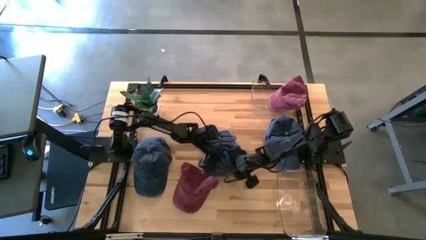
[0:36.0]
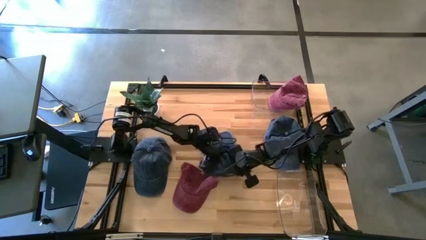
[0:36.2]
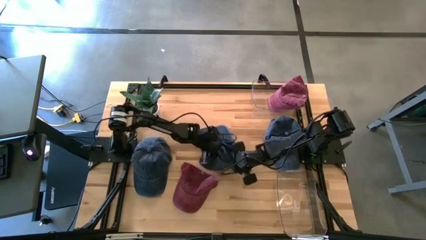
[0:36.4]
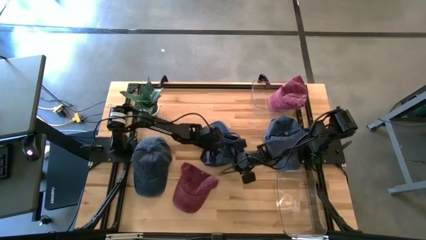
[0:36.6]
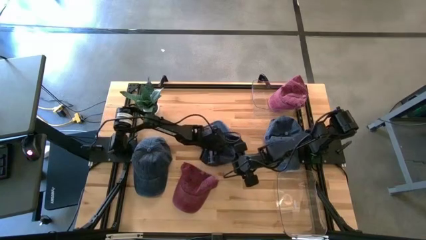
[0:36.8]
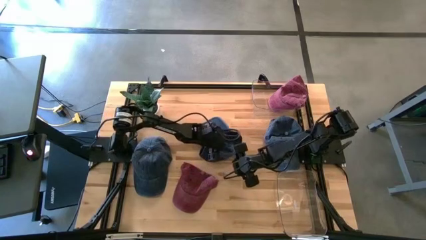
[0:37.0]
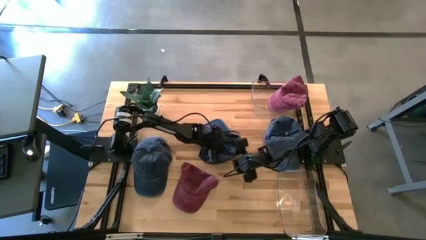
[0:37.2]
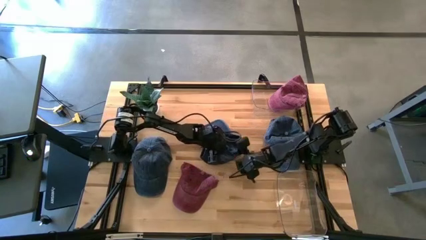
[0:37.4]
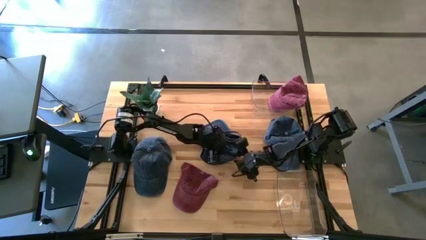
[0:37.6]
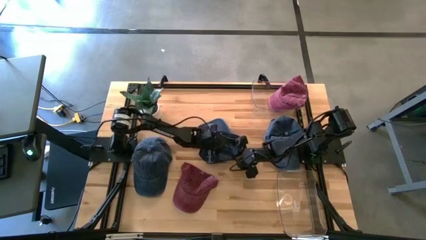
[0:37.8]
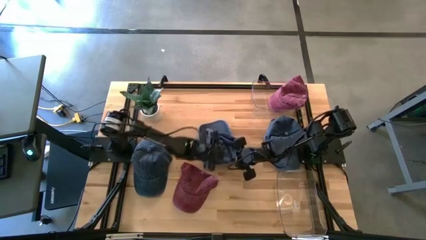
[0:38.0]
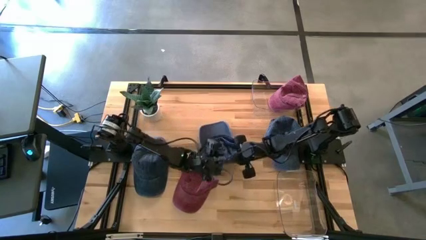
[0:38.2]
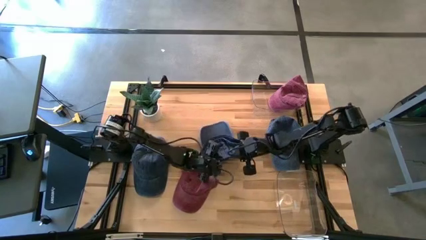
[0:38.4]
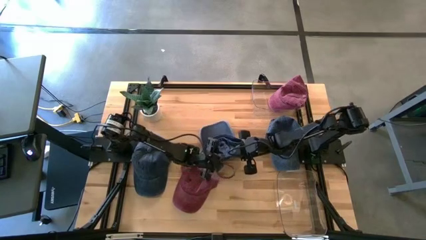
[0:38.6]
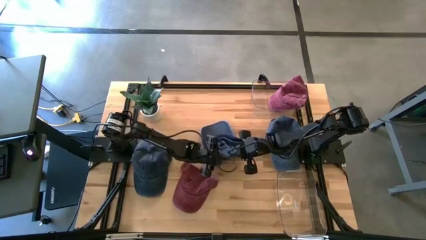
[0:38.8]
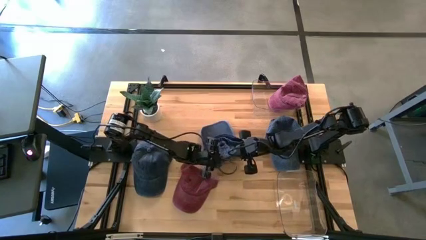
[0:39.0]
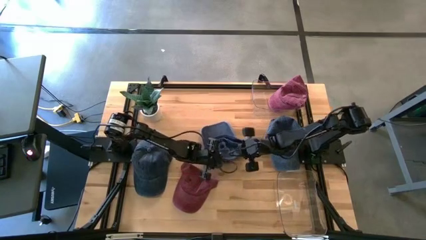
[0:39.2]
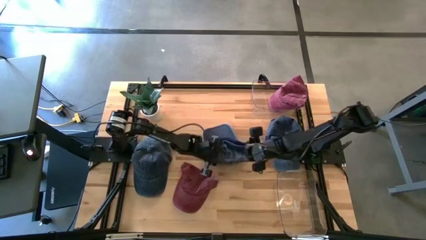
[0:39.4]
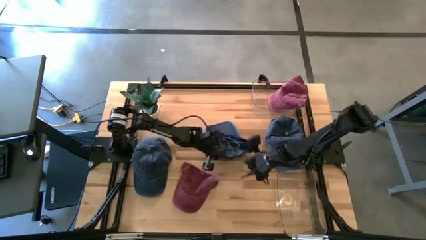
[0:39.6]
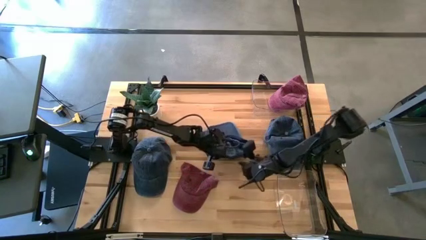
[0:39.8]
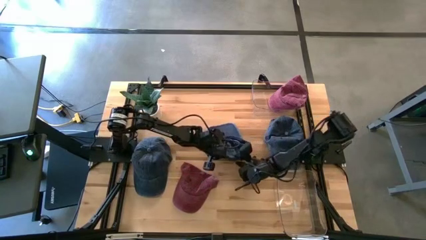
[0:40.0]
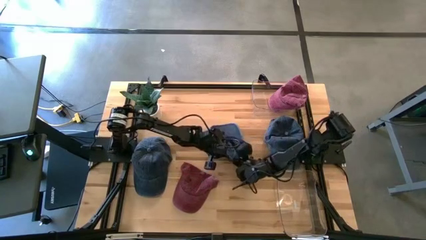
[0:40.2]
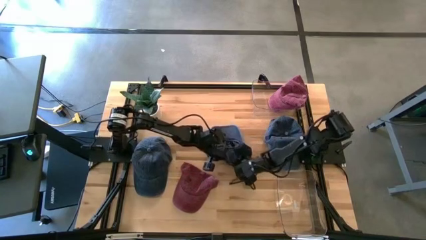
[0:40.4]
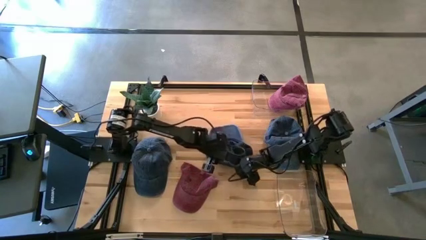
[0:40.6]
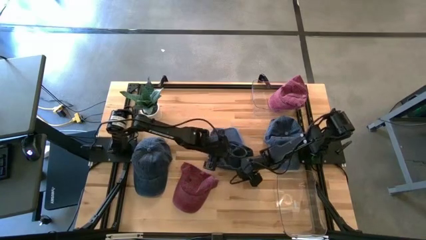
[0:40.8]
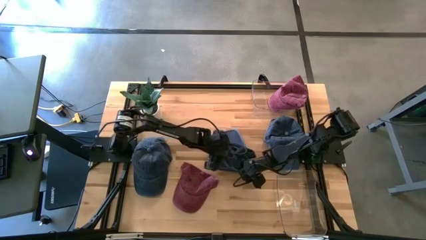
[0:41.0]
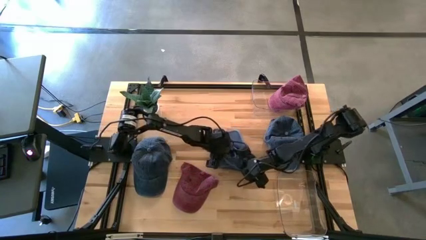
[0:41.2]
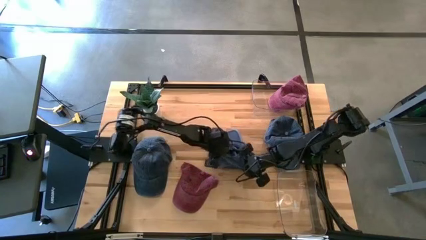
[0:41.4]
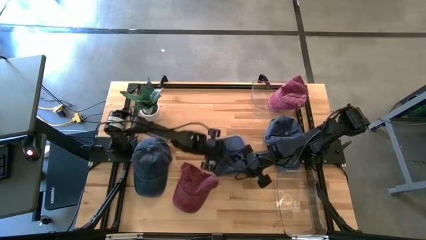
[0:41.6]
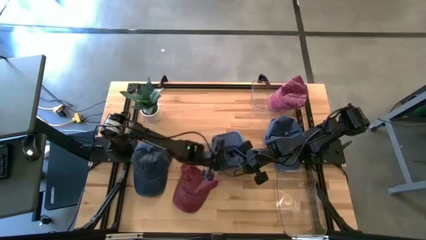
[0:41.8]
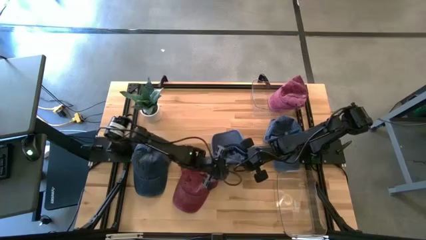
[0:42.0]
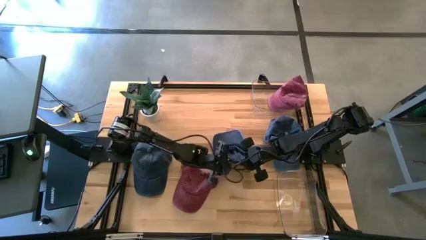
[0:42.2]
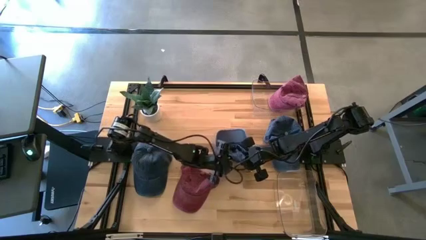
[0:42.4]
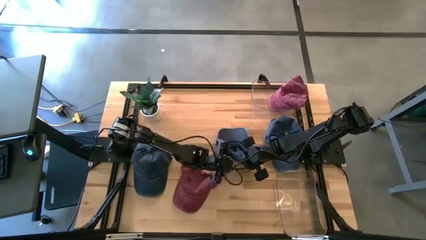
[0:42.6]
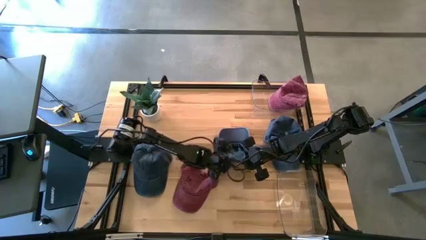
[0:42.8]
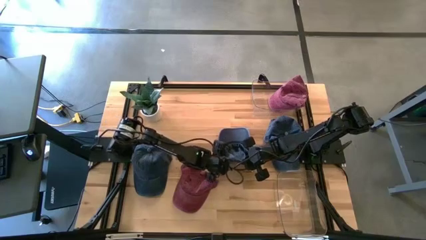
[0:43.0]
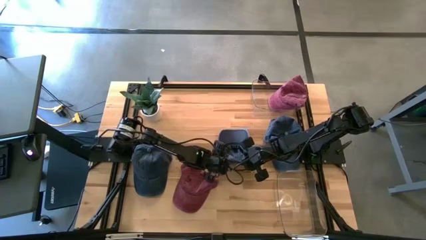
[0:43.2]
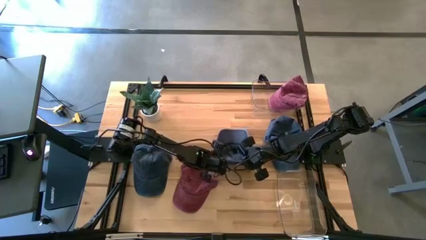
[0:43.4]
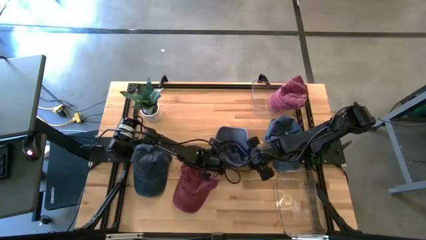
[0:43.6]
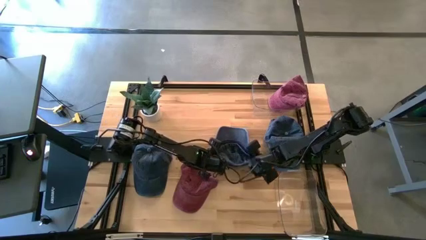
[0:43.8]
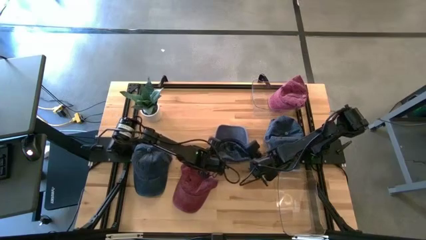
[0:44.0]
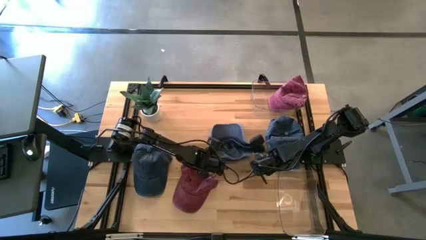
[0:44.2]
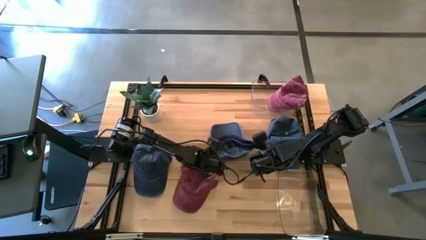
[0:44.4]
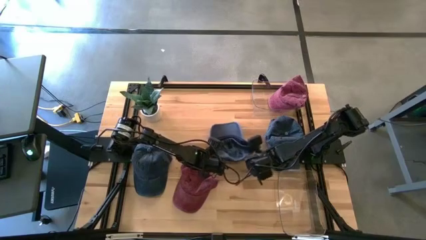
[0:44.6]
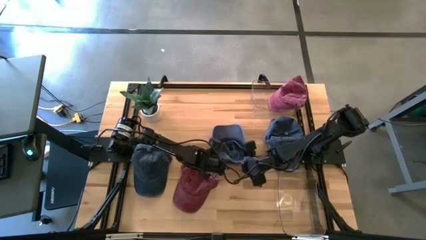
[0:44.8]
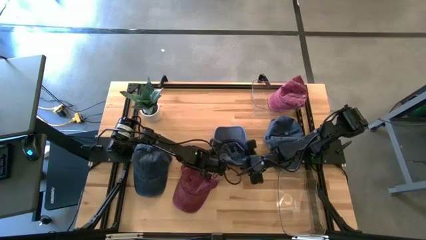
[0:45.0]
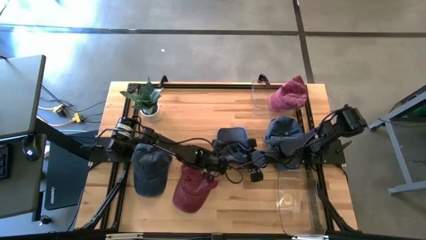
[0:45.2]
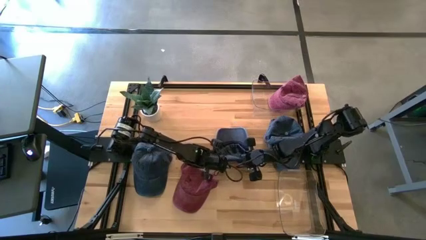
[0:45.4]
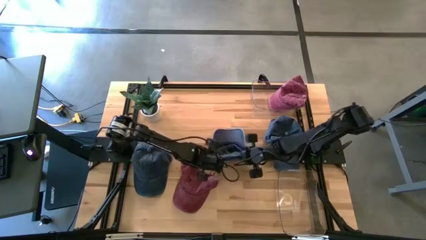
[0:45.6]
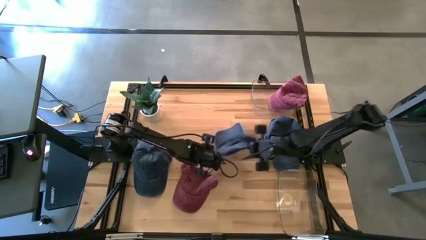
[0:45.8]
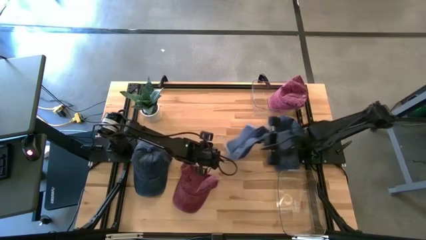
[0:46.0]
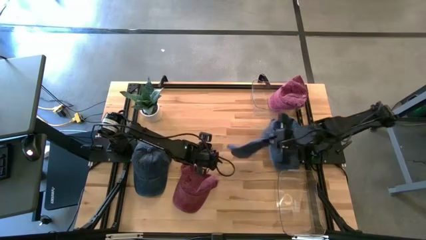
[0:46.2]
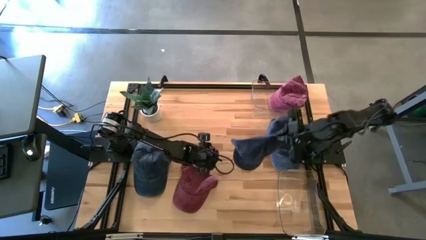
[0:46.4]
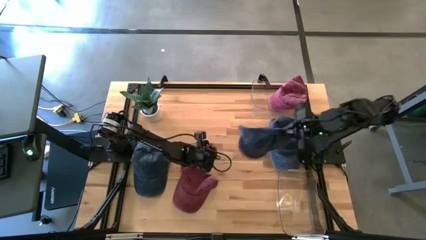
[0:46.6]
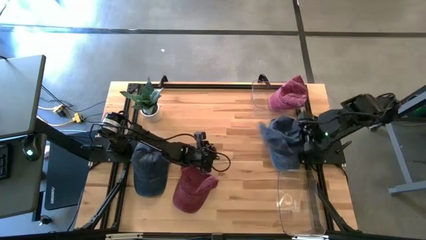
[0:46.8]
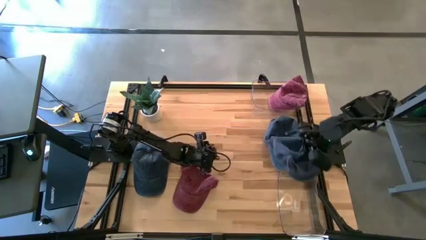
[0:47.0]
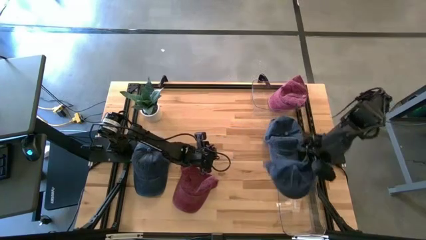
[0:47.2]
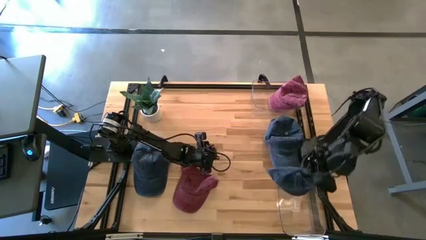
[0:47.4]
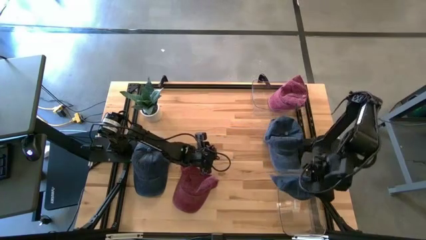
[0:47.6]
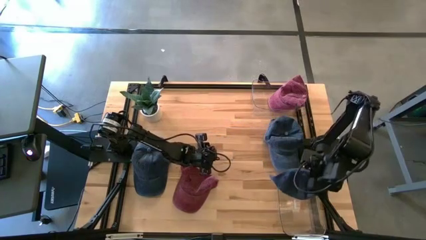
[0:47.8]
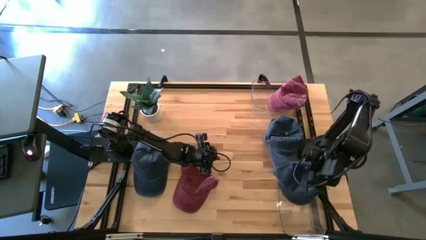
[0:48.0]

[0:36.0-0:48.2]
Task: Pick & Place hat
Put the middle blue cap into the bottom transparent bin
